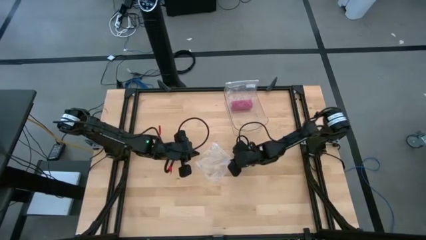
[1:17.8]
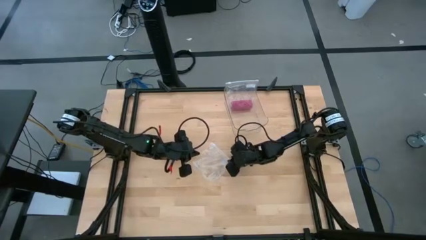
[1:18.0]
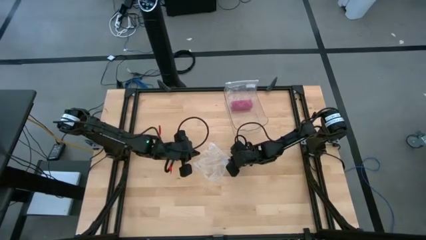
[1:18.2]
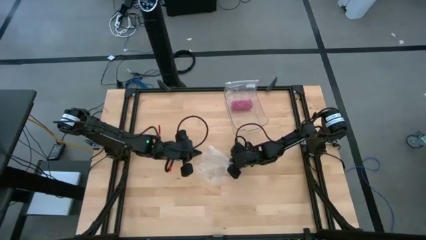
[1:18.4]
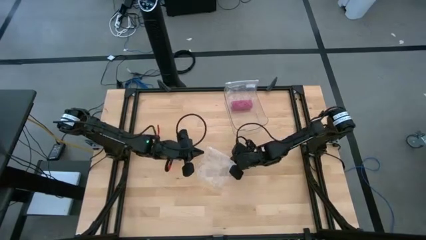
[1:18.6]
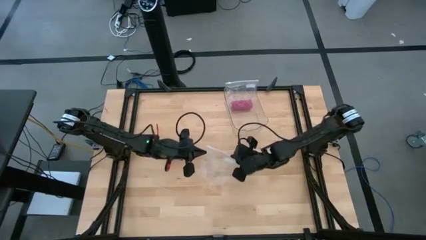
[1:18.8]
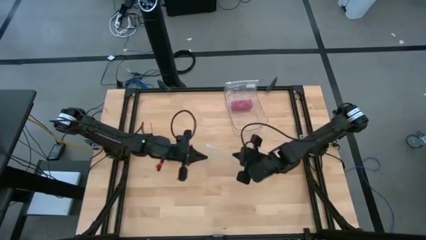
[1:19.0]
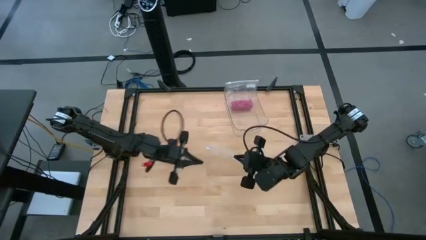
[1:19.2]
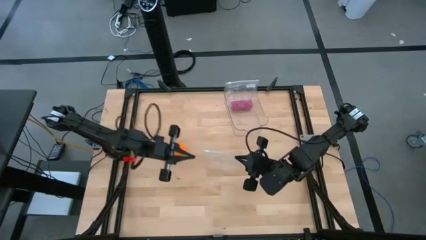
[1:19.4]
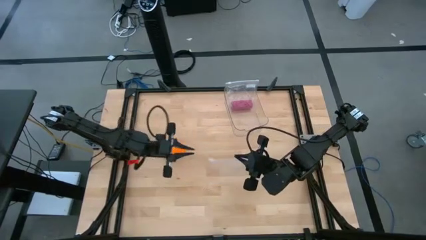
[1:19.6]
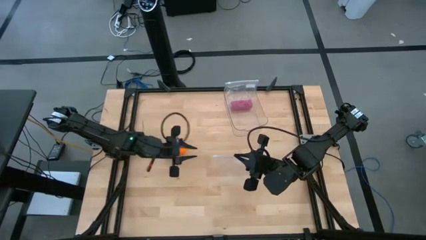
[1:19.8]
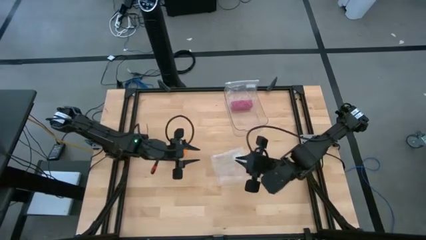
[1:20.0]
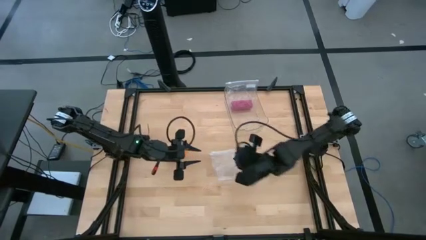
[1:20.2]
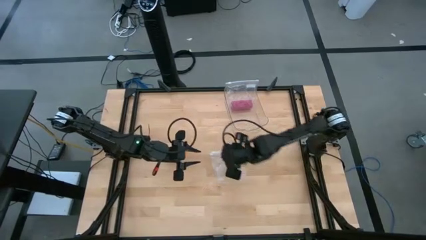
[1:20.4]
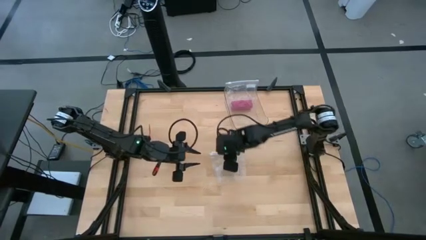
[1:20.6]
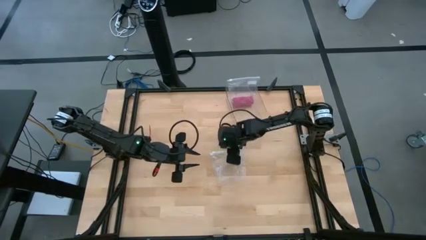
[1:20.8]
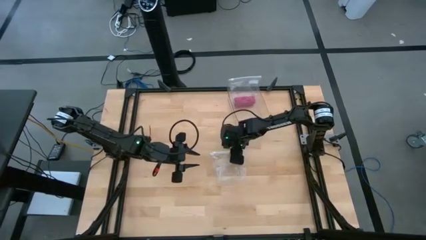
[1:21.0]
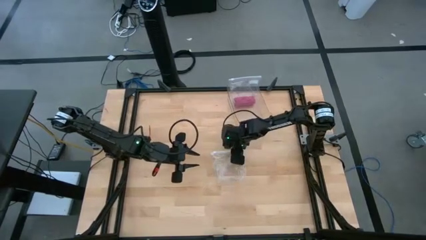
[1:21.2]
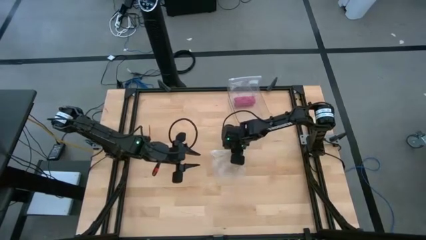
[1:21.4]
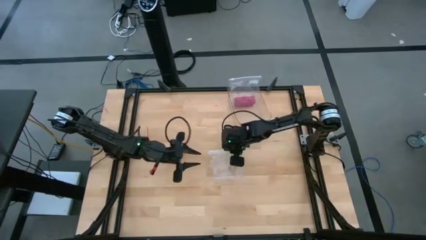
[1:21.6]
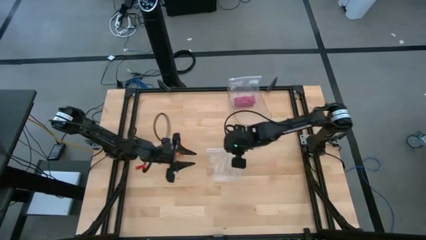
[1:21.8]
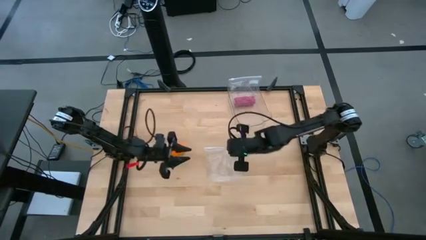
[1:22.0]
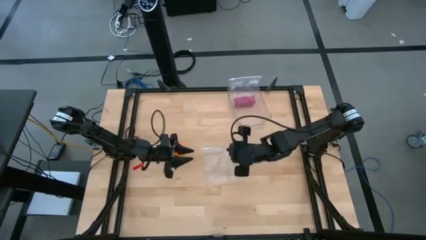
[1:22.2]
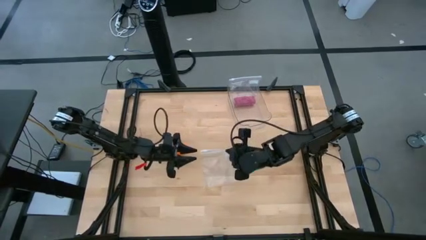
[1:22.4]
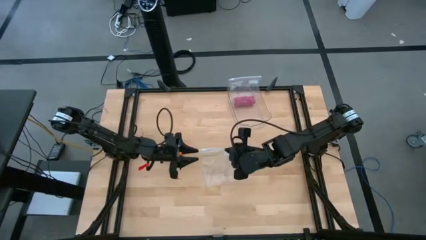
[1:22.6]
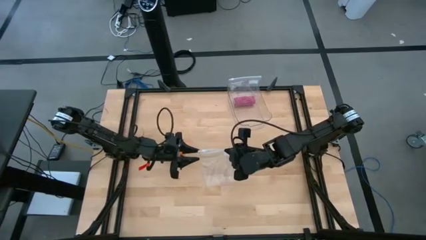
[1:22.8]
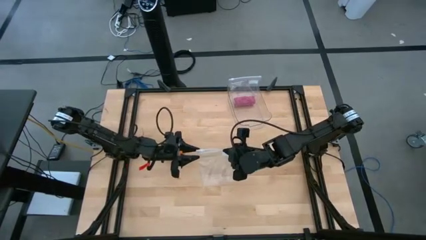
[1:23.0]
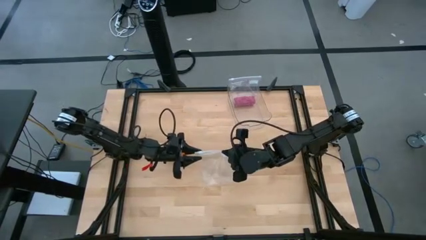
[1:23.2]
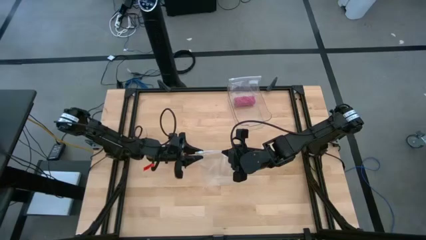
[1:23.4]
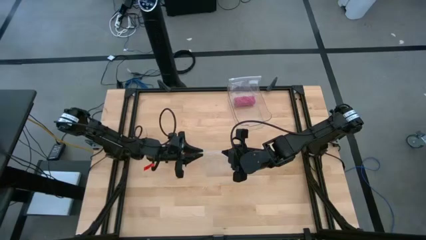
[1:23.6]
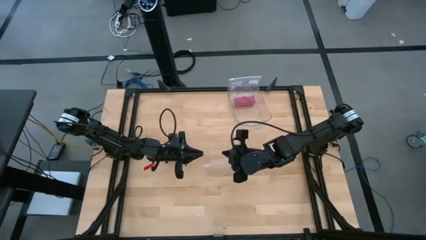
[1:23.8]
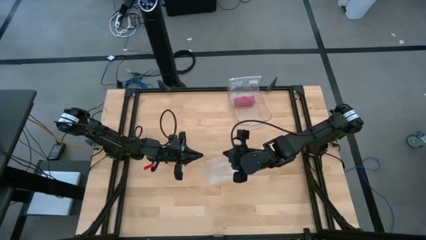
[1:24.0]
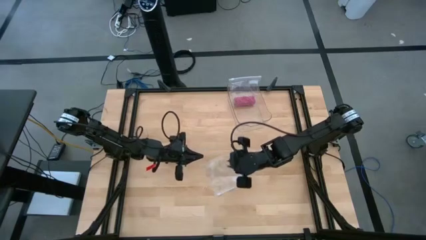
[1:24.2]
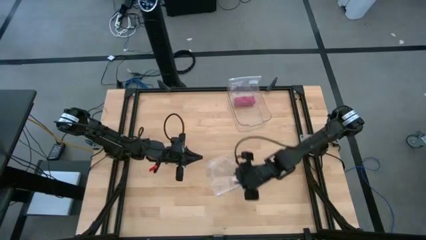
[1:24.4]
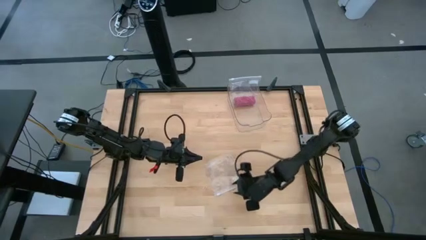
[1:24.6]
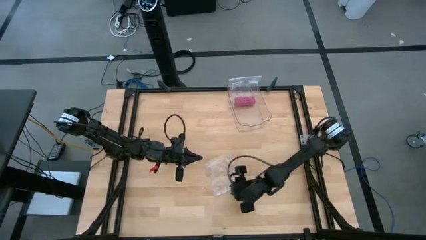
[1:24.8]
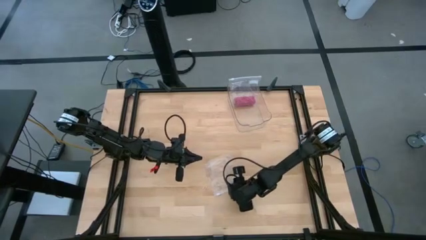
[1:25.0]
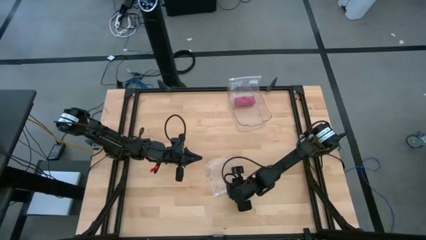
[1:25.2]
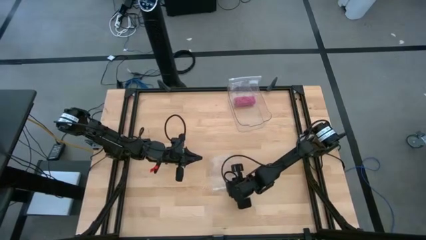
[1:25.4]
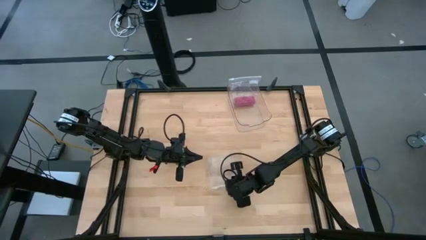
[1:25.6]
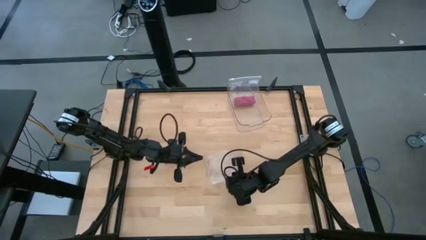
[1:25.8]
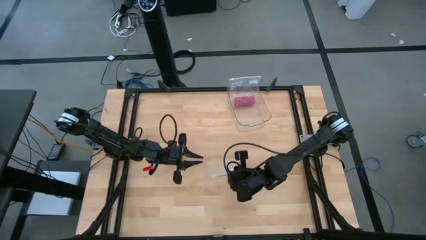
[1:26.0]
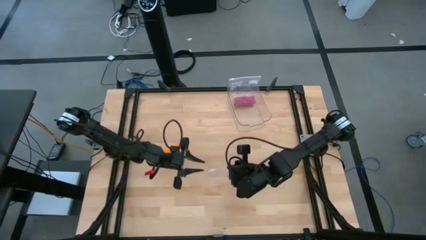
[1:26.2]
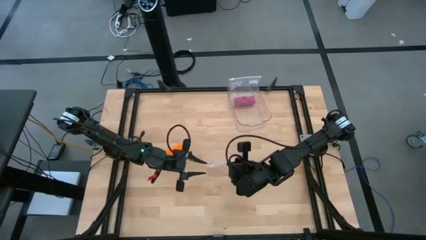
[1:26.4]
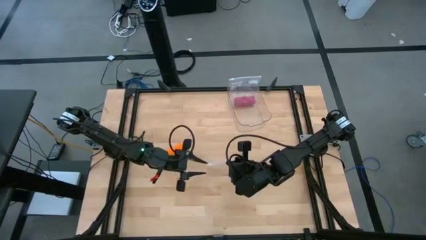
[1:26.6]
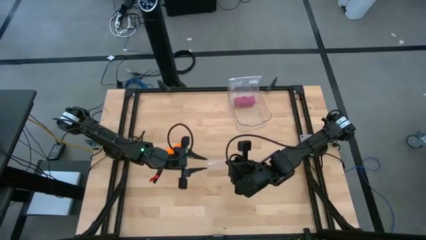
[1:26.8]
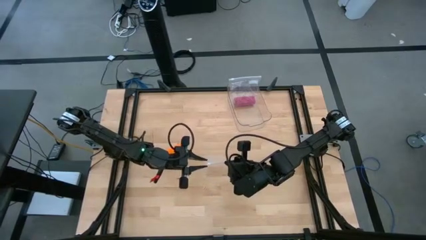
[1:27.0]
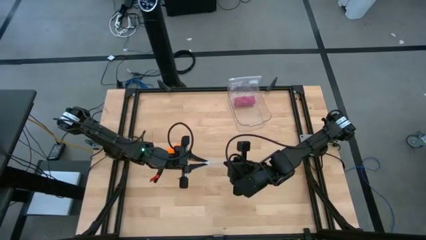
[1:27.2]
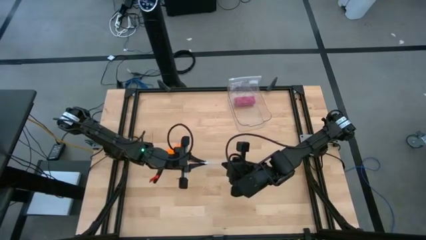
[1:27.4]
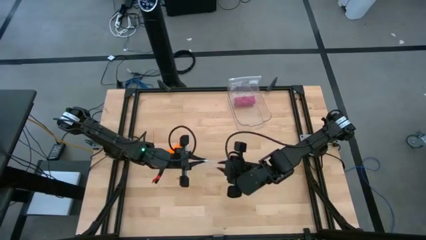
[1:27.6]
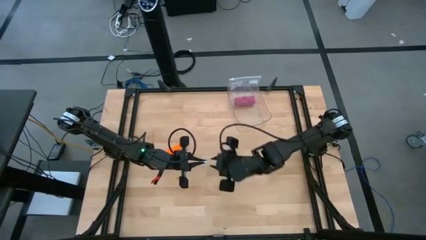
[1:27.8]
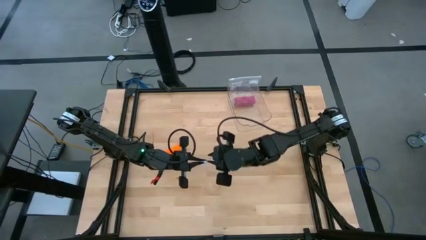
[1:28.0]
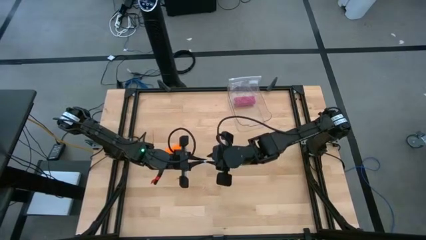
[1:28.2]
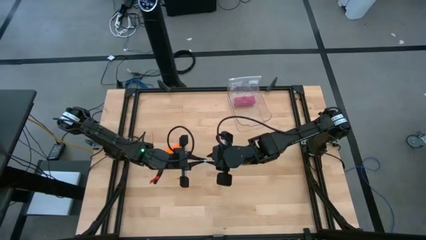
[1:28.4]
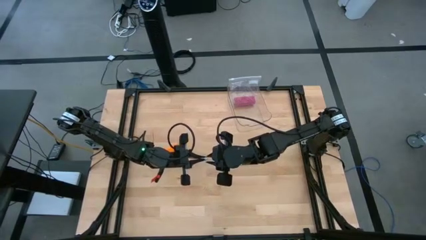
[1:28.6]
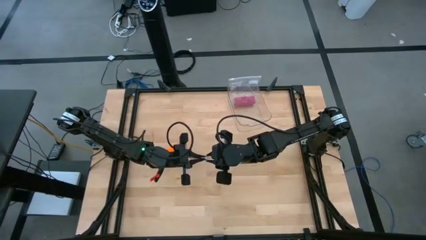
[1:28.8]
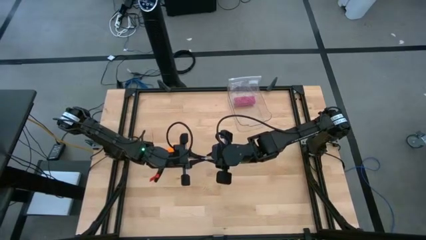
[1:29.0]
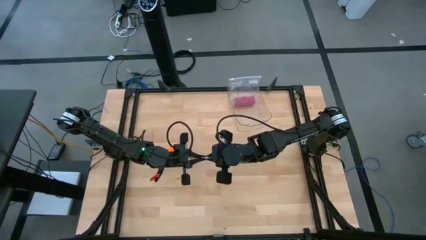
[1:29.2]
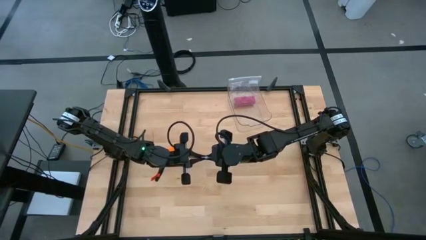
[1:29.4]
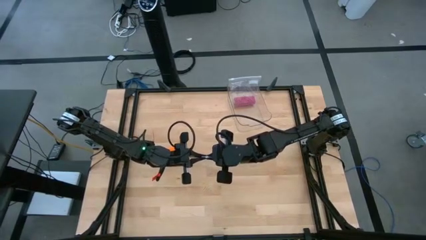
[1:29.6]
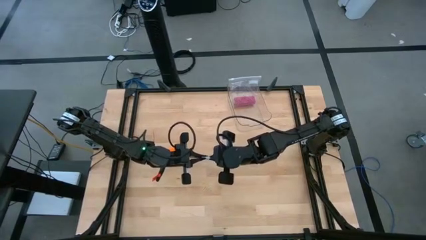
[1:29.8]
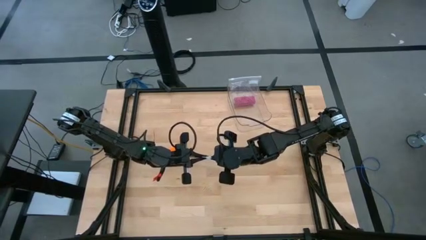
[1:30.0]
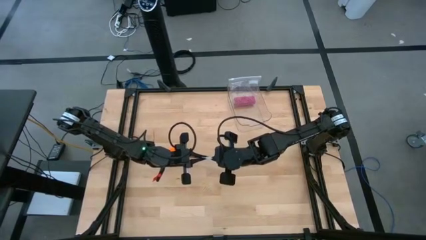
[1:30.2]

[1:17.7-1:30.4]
Task: Roll bandage
Open the transparent zip bag
